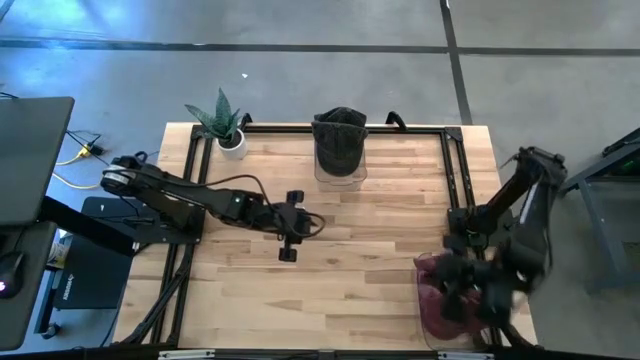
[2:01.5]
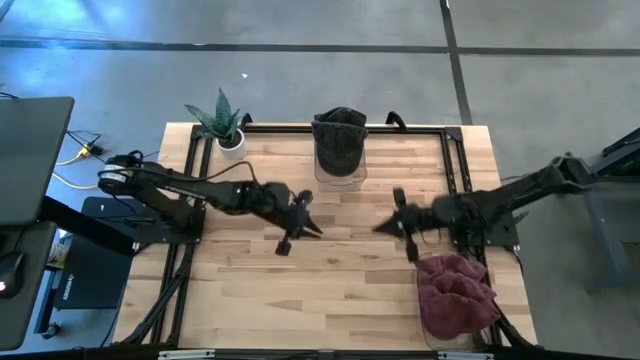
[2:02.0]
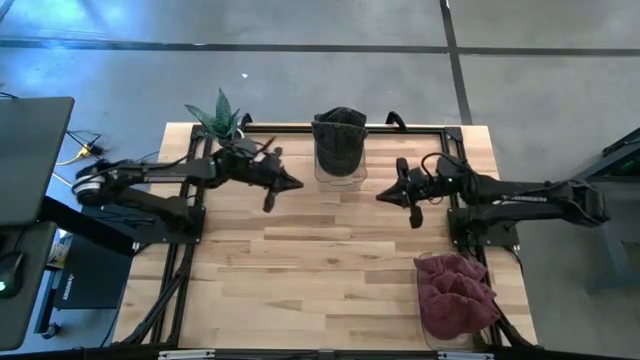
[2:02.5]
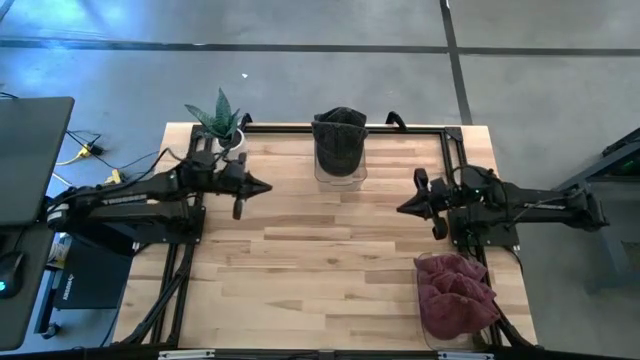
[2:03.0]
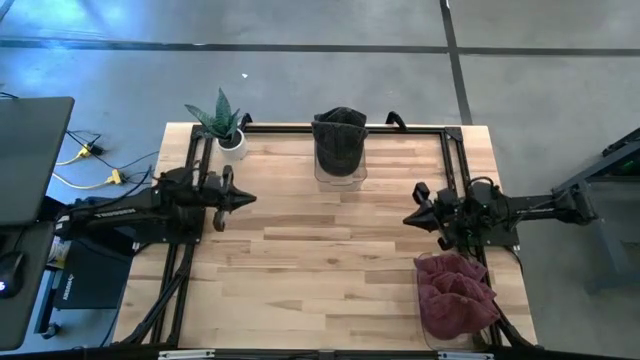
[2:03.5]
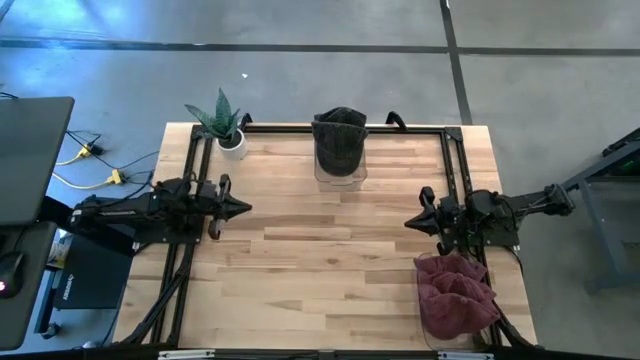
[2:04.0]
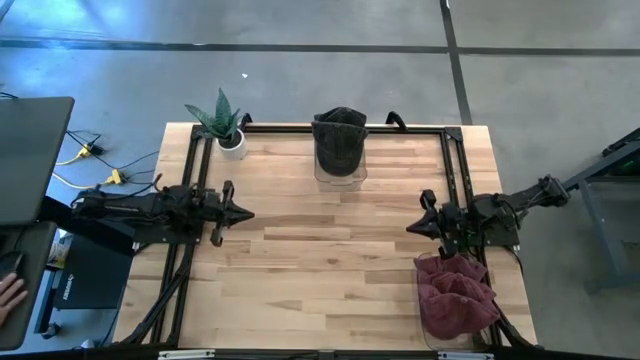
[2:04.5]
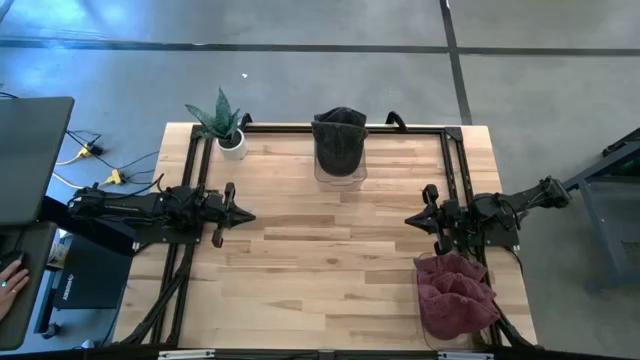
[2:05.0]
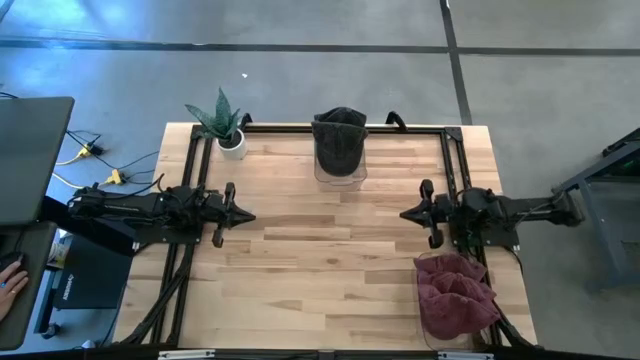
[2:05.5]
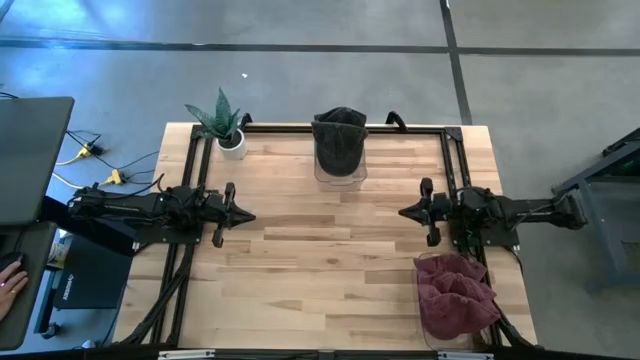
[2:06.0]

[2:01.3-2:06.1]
Task: Pick & Place hat
Return to Home Position

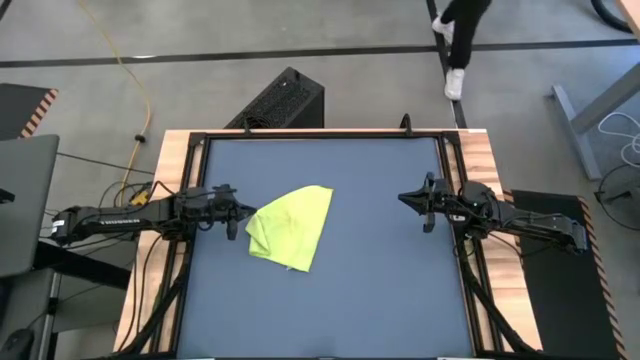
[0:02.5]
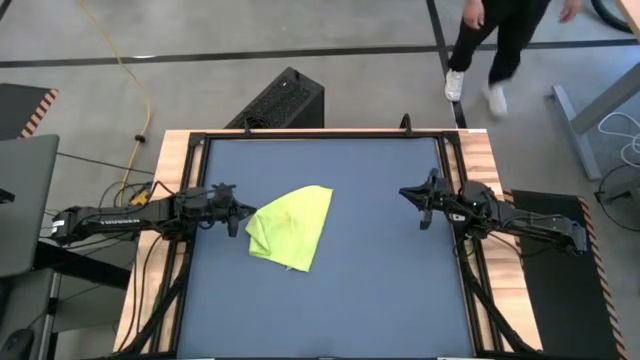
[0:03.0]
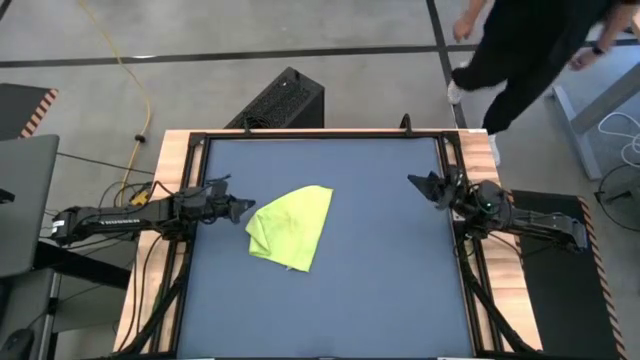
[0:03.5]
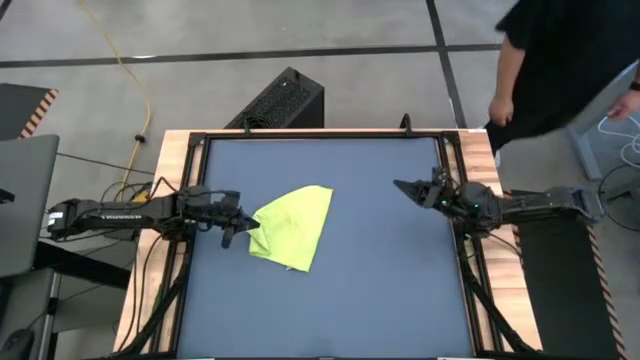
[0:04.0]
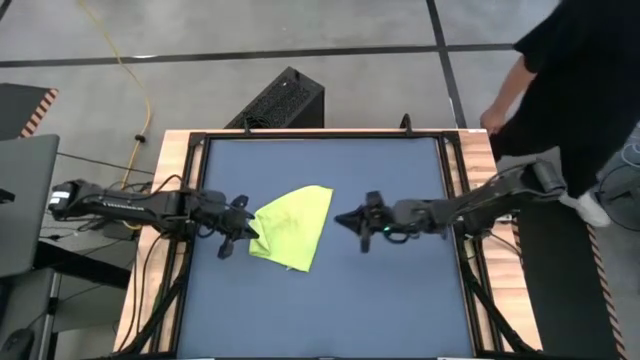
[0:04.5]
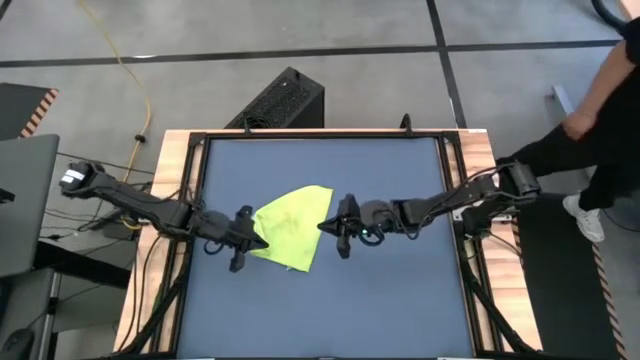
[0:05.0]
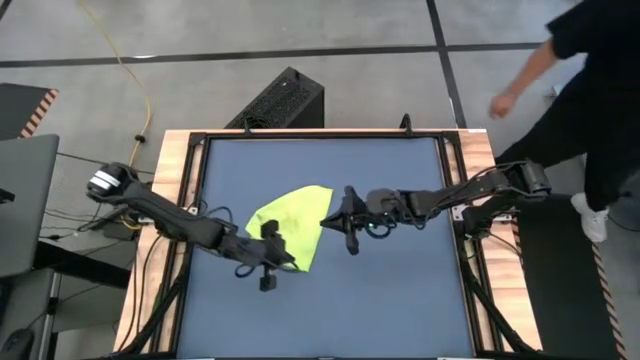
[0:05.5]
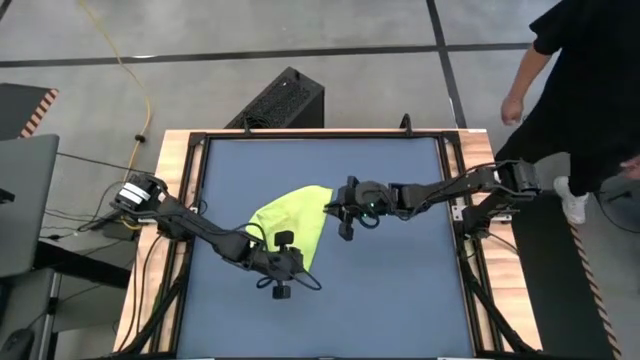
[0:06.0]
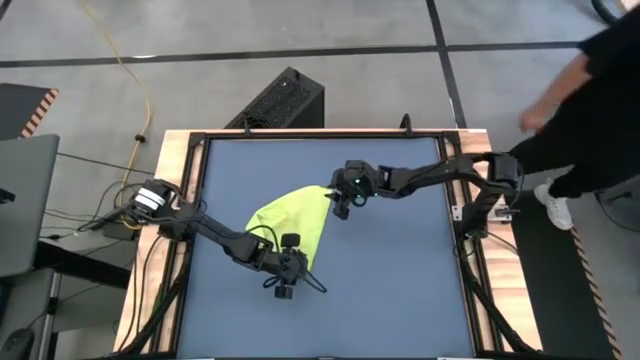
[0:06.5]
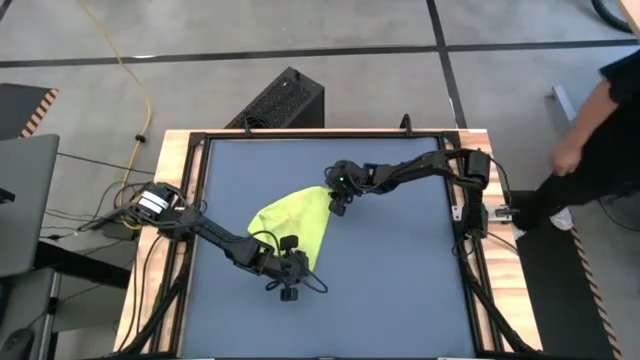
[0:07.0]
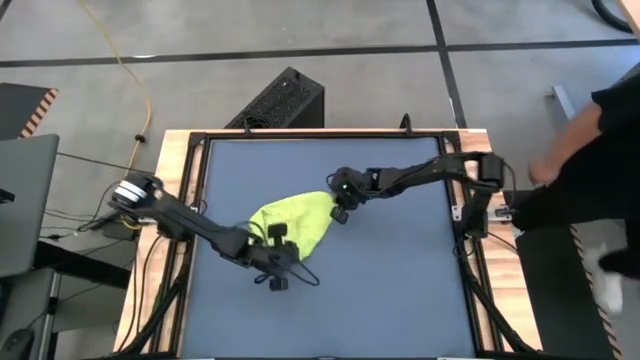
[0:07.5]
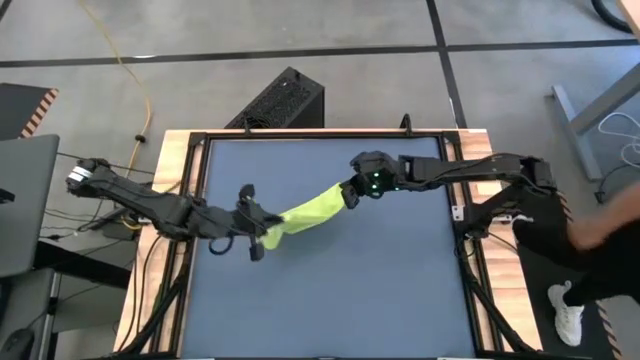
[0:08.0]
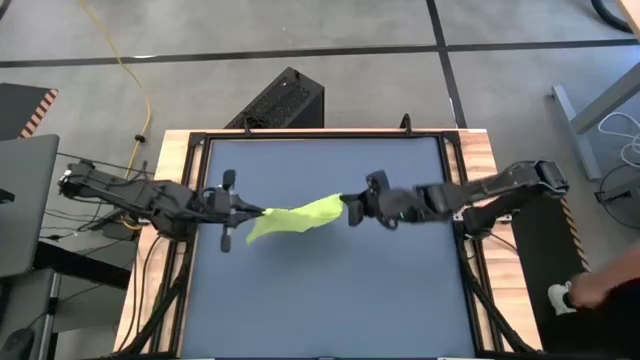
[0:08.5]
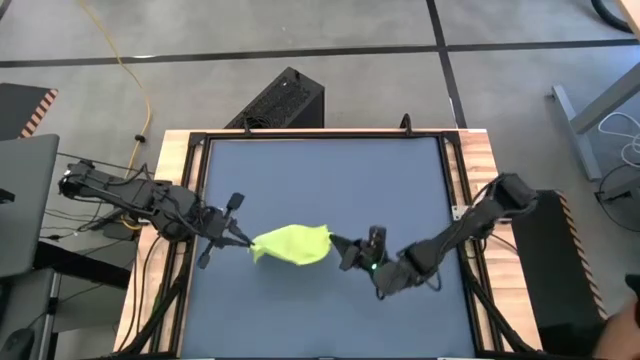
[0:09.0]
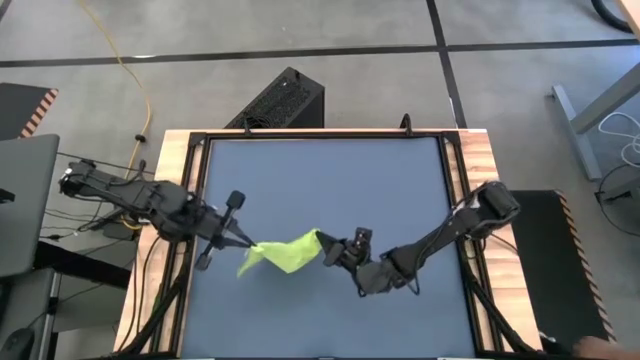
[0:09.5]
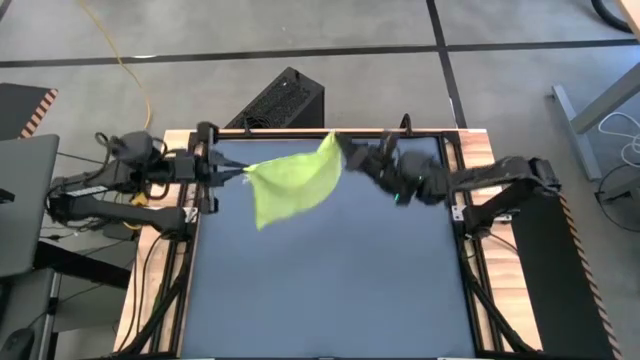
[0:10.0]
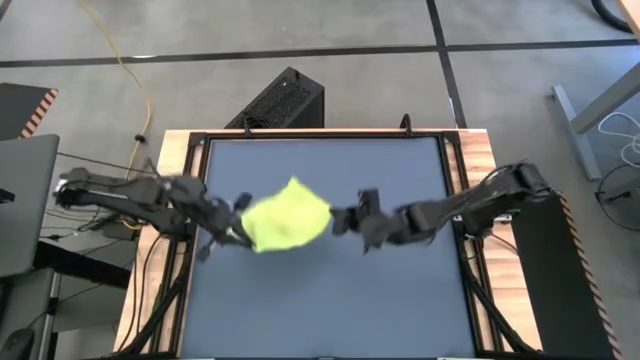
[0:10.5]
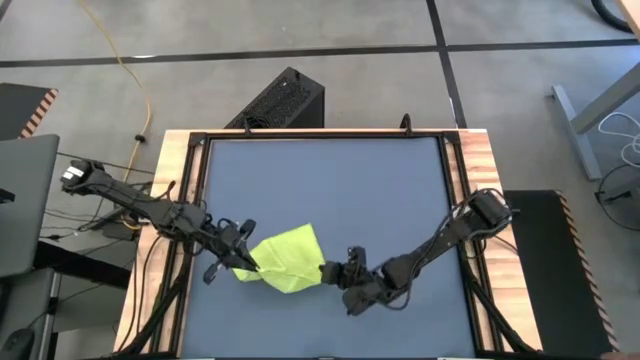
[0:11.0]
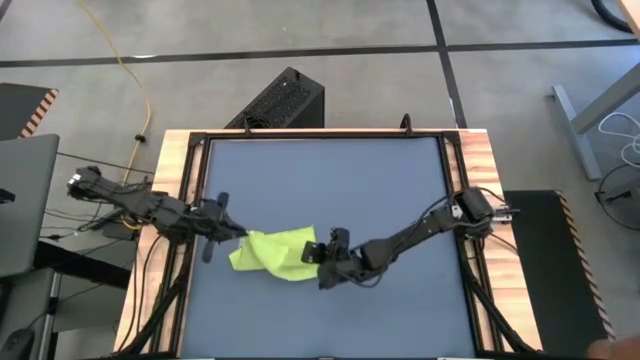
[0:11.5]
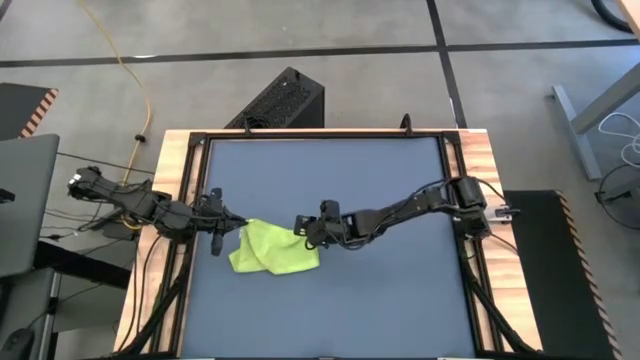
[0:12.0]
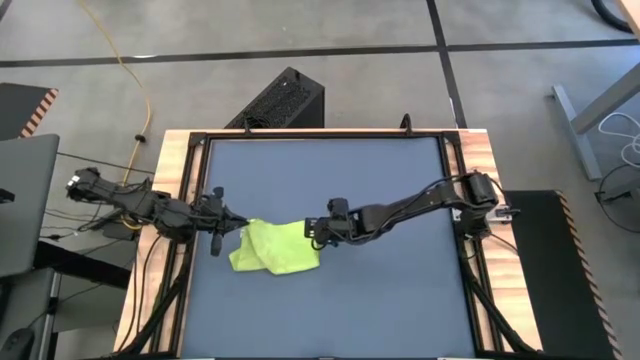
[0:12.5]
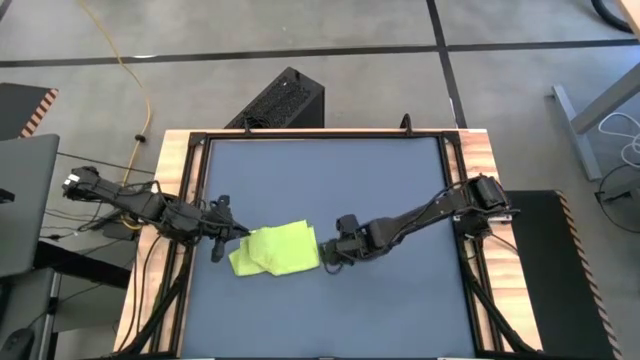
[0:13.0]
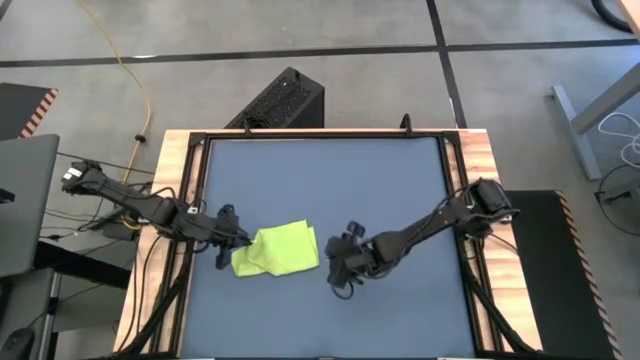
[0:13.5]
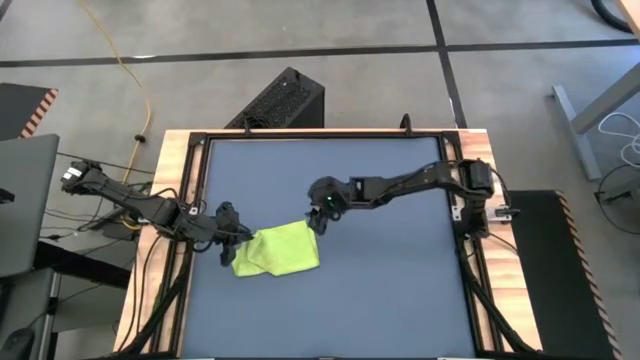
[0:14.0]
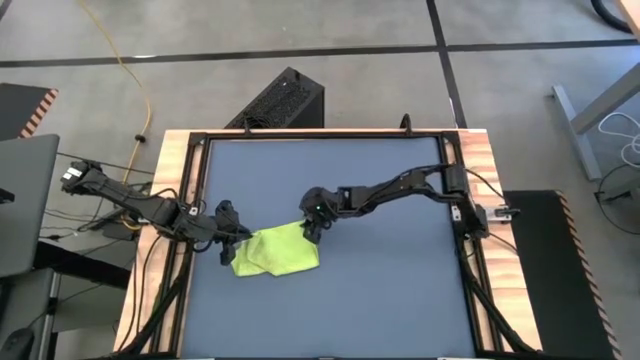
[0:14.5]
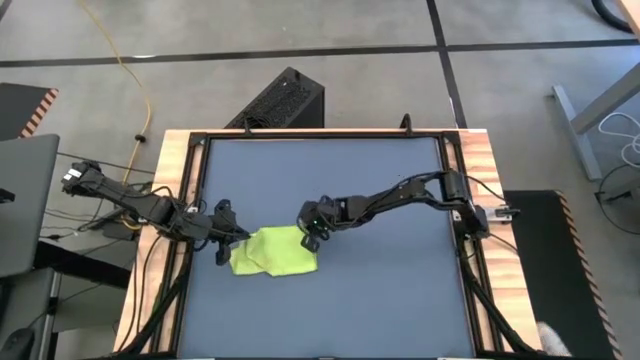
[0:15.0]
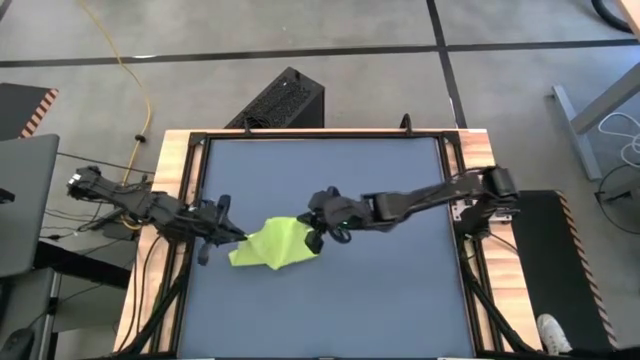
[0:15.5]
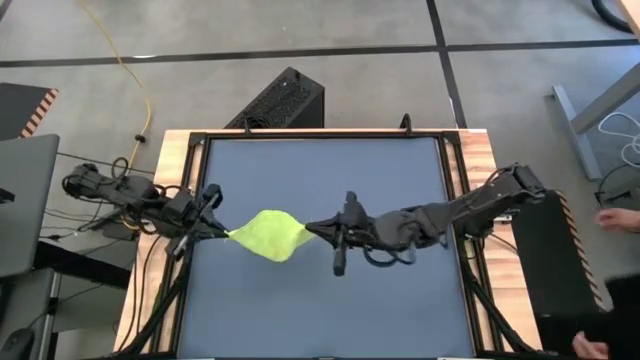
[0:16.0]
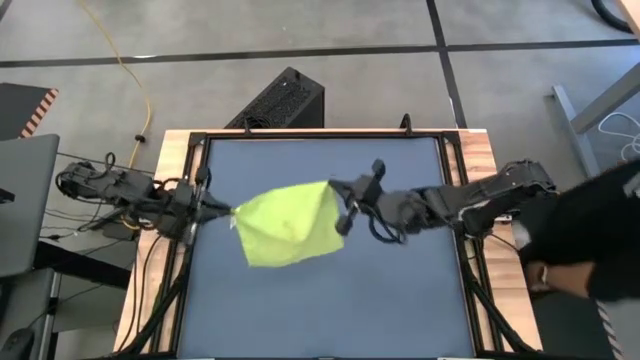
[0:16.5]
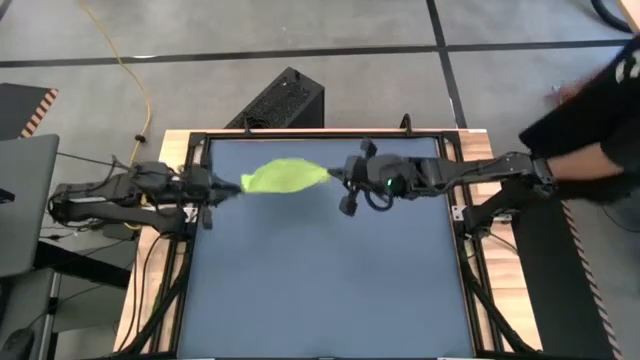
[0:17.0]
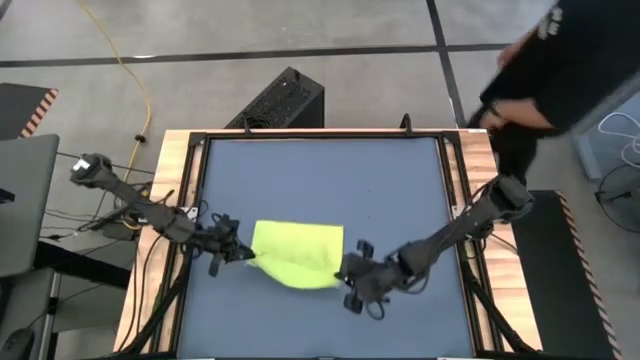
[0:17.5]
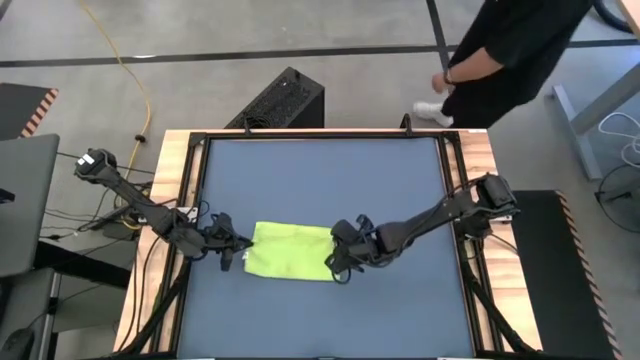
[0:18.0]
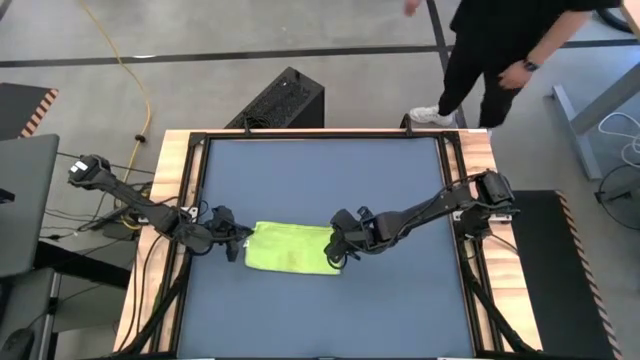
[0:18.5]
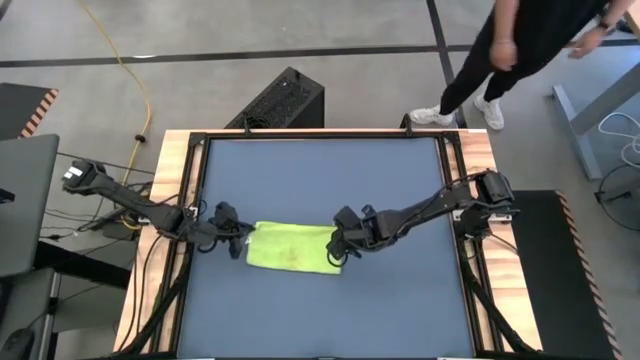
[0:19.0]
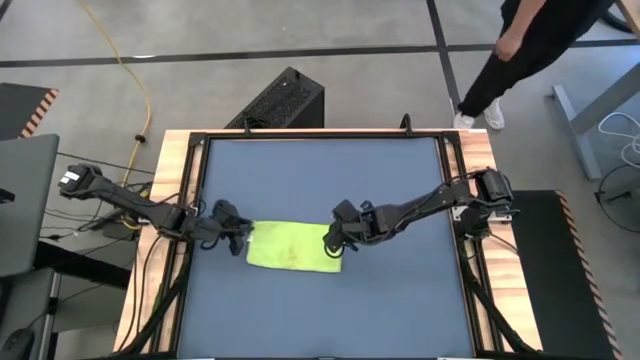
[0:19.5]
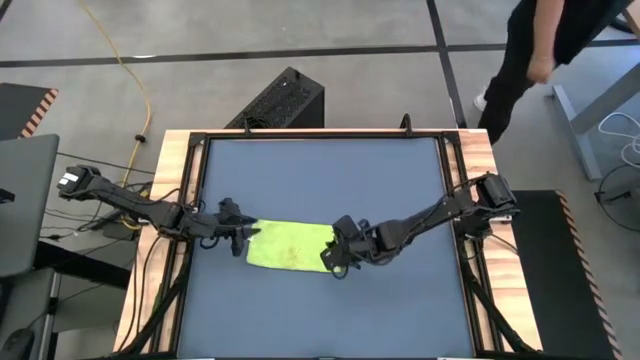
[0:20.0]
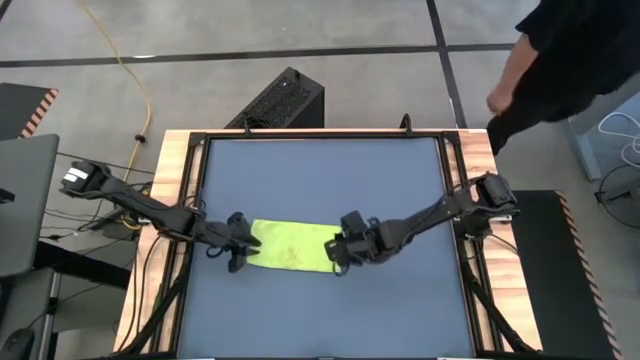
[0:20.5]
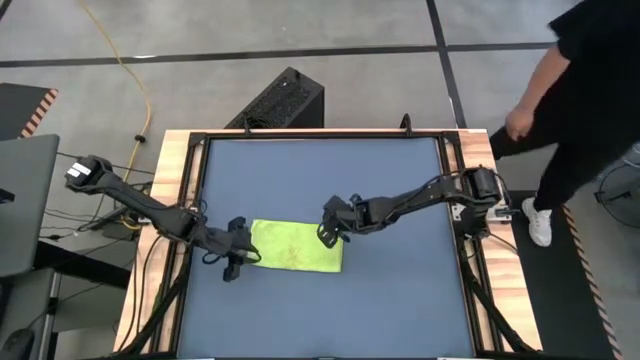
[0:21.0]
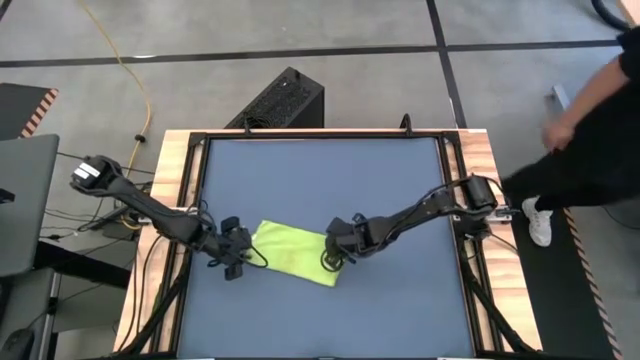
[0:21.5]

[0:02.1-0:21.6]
Task: Roll towel
Roll the green towel
